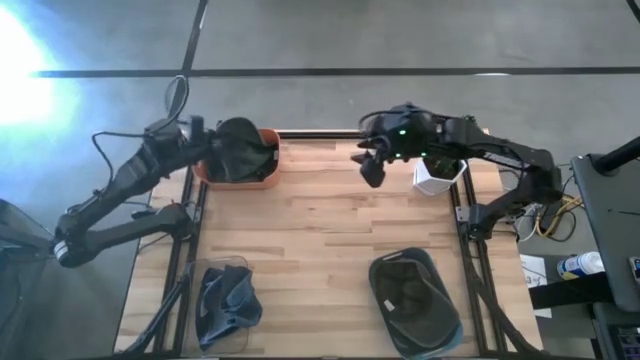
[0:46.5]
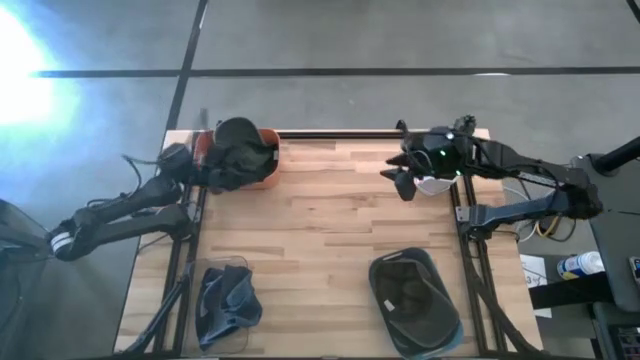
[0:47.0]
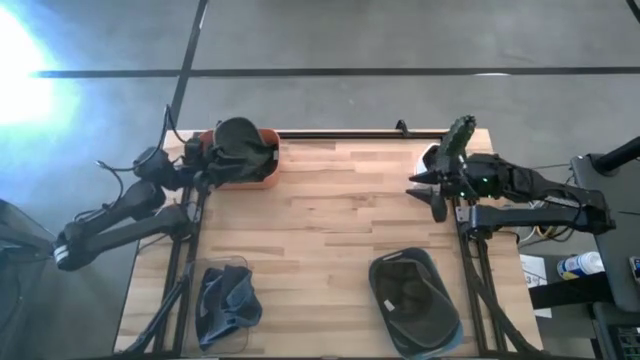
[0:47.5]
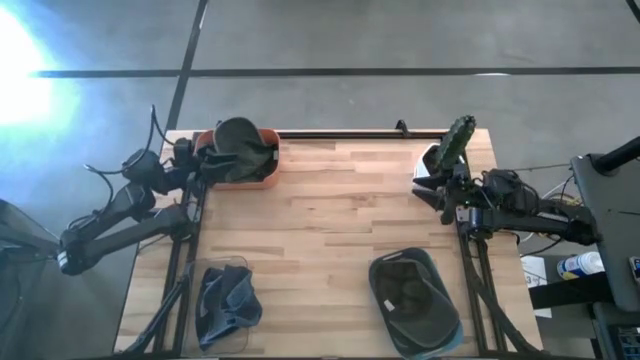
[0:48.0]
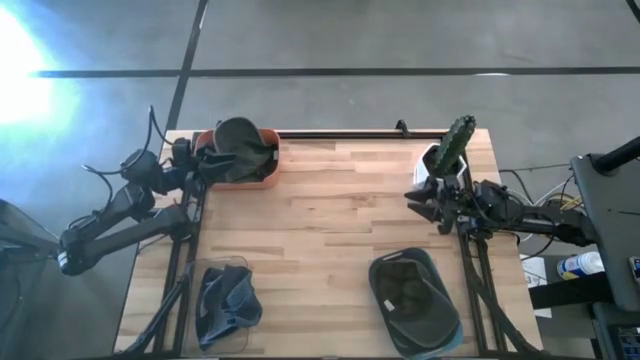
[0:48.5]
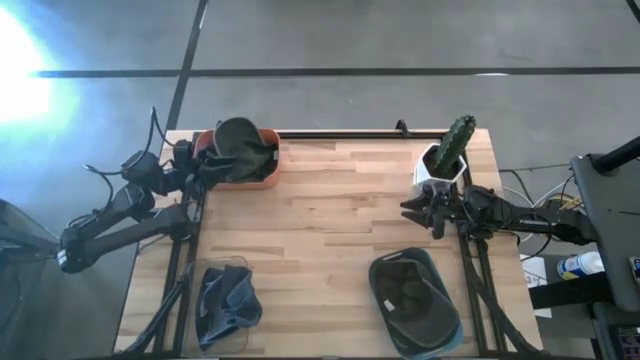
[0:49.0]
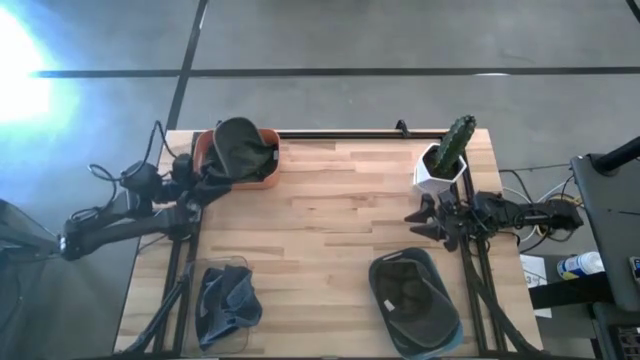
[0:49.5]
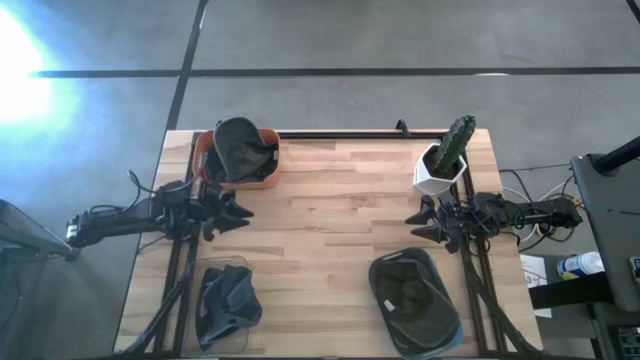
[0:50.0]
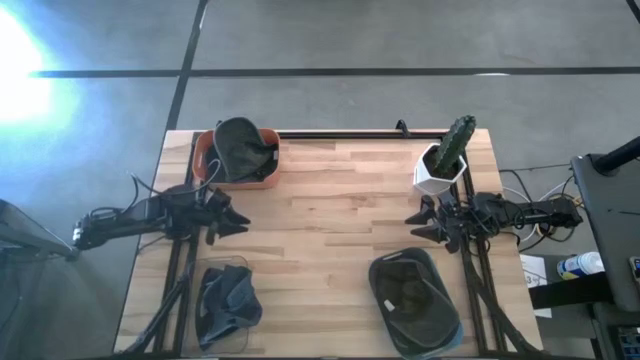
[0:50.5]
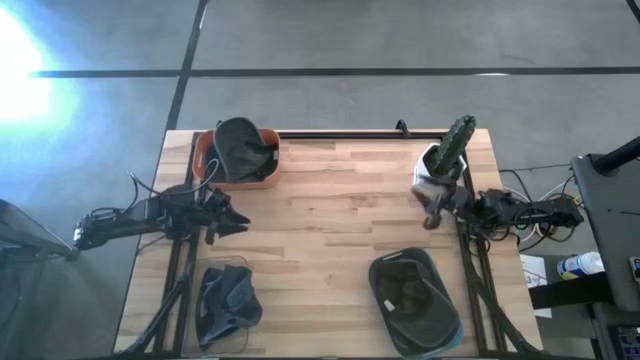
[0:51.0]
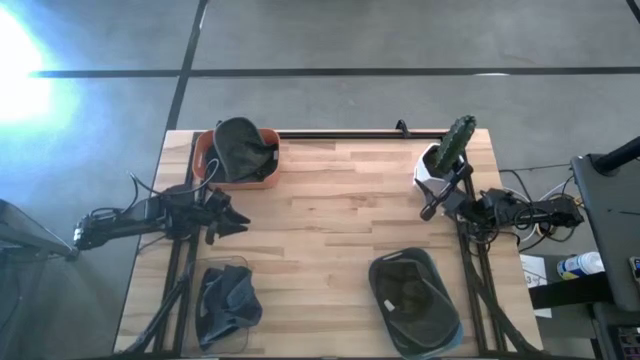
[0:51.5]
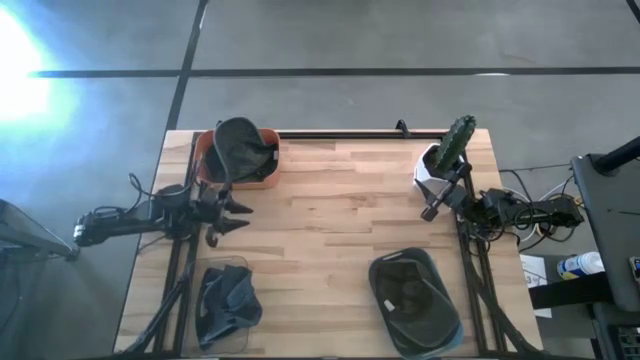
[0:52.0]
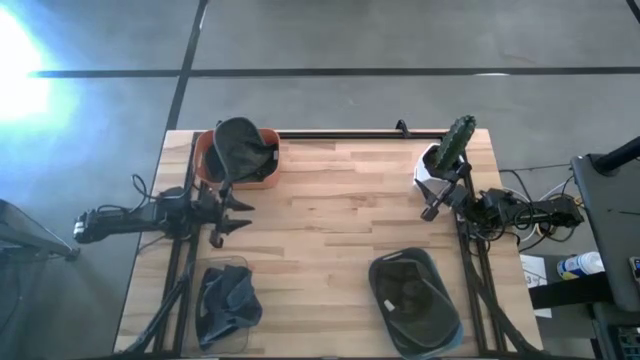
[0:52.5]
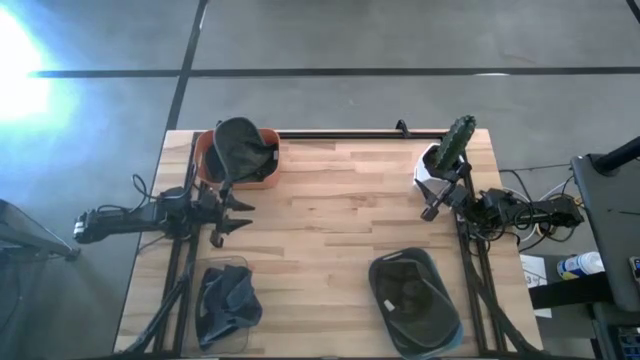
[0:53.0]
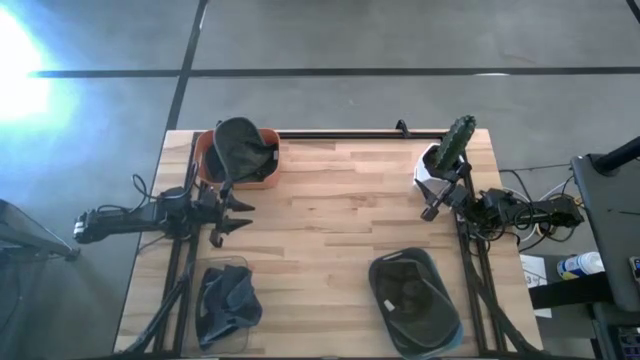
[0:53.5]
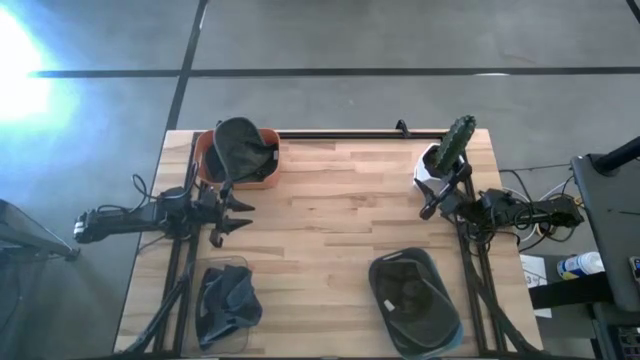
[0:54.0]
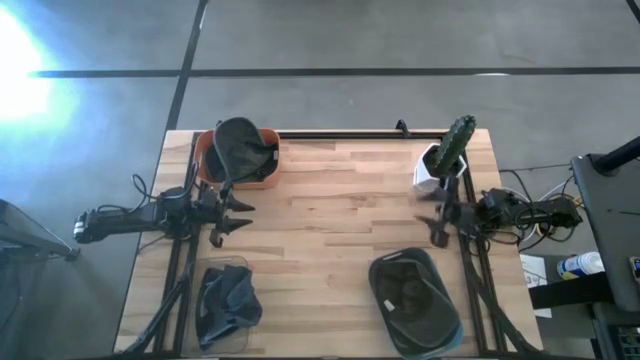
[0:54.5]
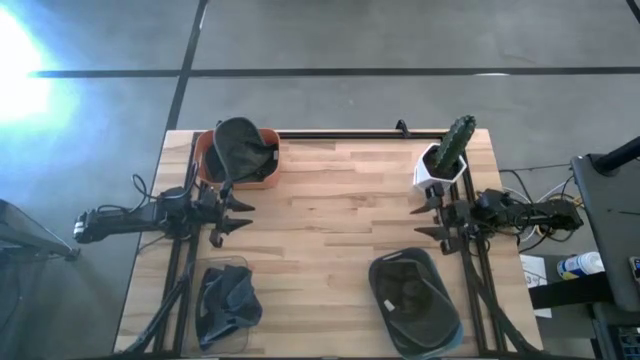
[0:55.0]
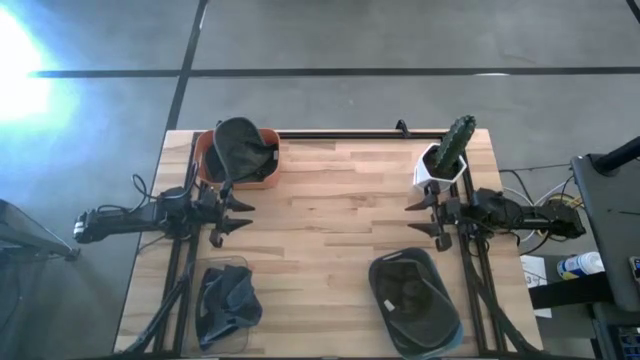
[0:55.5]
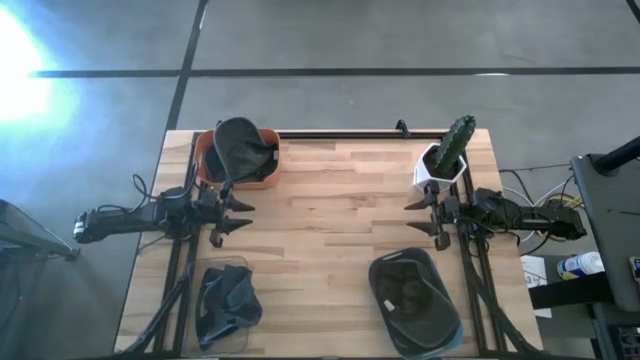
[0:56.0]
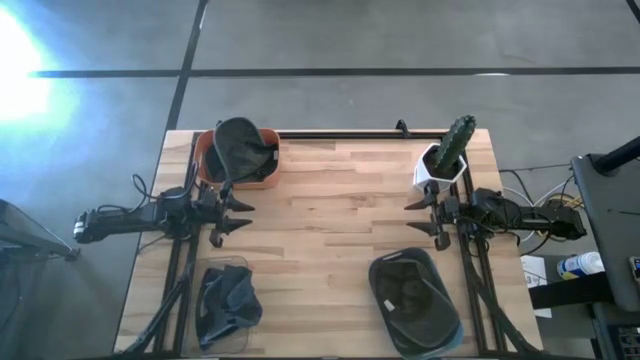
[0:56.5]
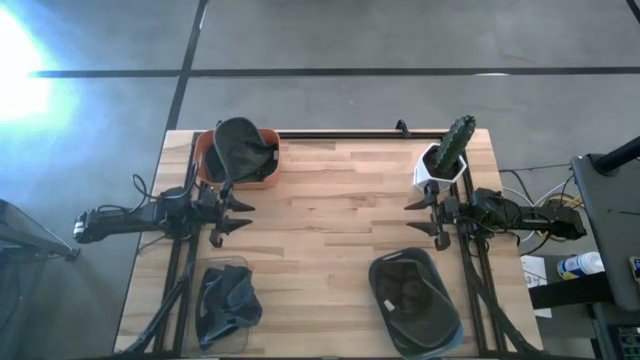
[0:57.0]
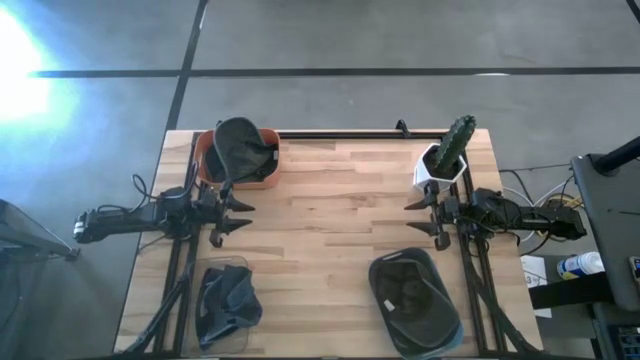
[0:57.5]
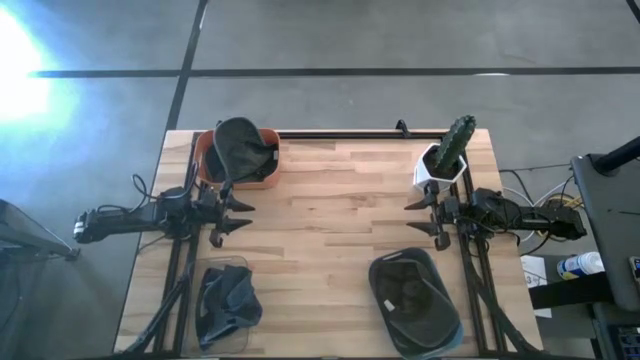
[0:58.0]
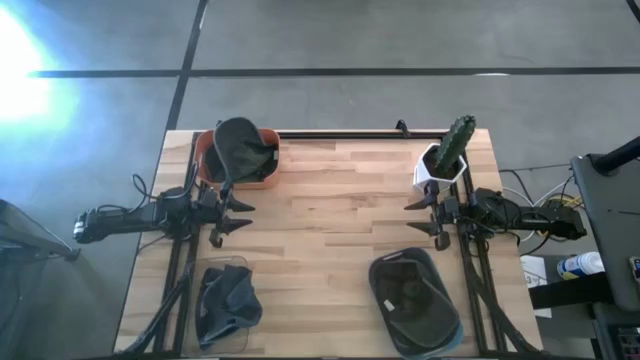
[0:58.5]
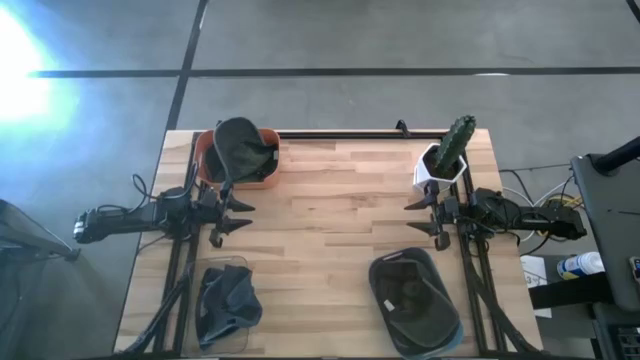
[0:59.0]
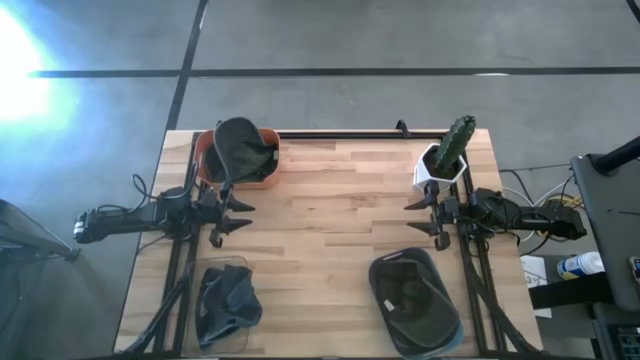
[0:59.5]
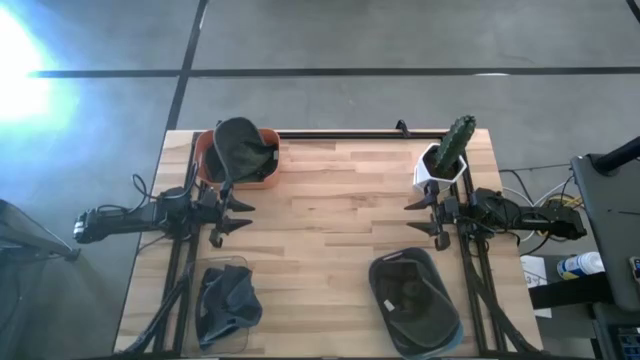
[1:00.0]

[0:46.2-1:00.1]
Task: Pick & Place hat
Return to Home Position
